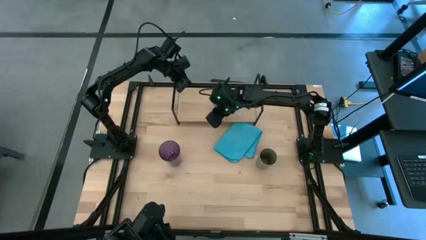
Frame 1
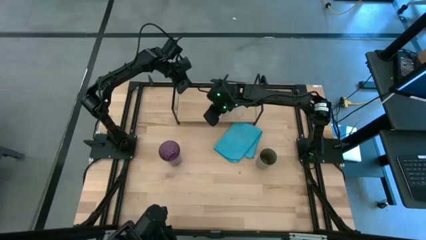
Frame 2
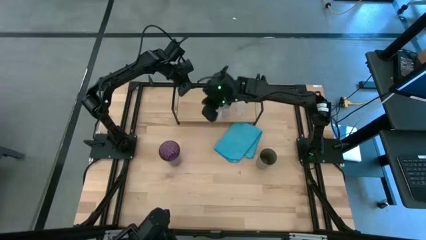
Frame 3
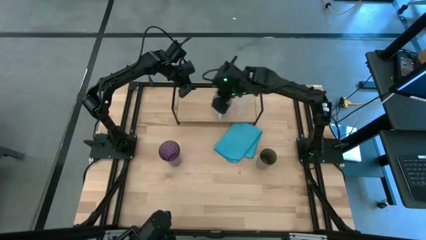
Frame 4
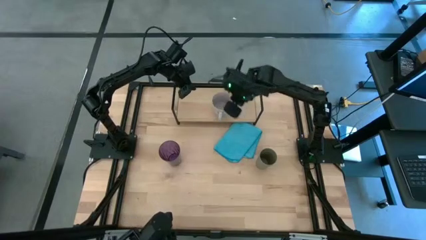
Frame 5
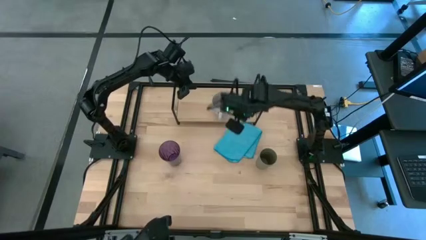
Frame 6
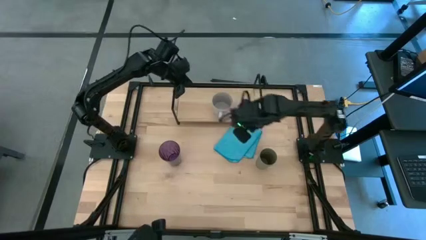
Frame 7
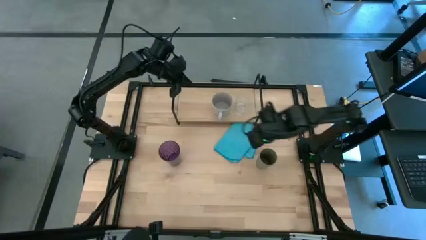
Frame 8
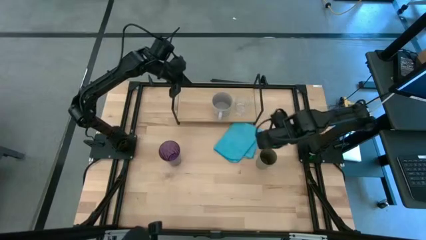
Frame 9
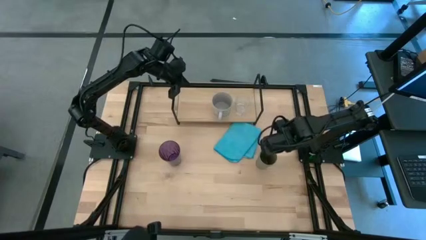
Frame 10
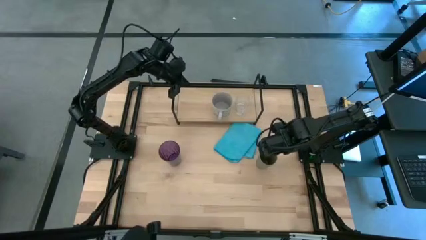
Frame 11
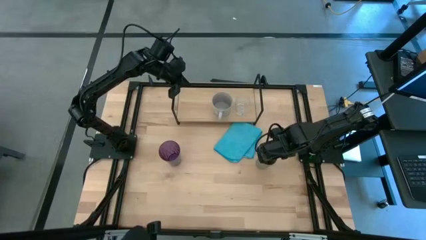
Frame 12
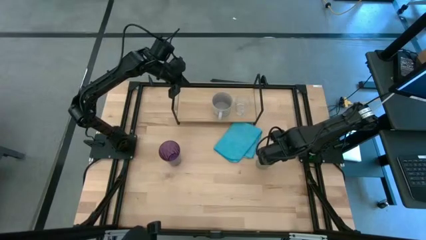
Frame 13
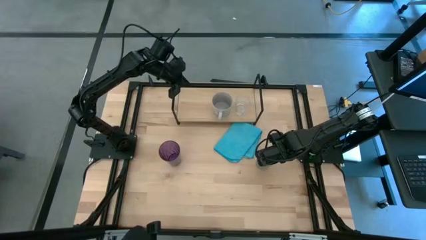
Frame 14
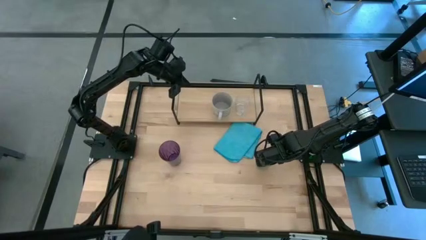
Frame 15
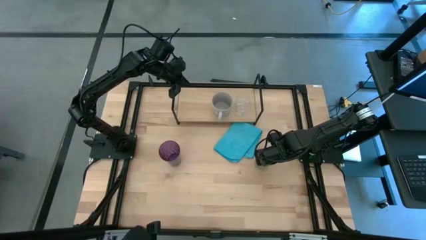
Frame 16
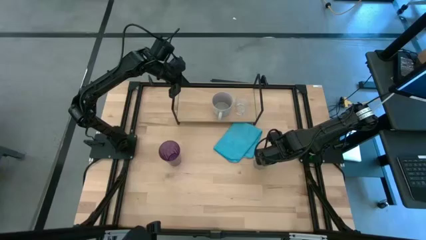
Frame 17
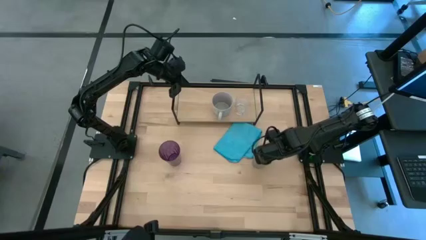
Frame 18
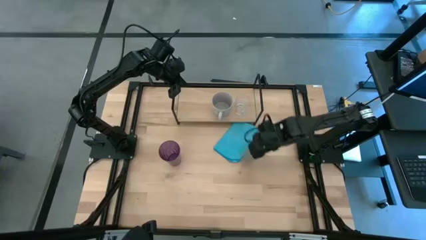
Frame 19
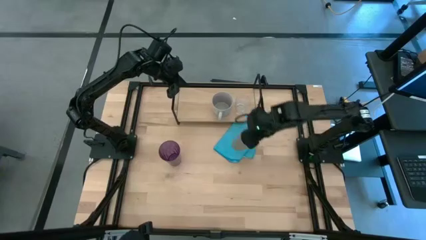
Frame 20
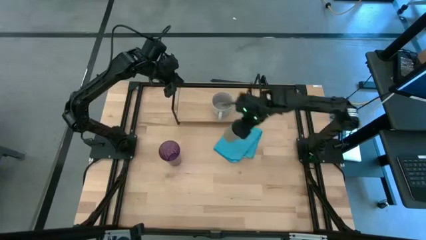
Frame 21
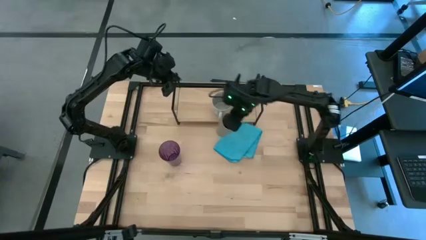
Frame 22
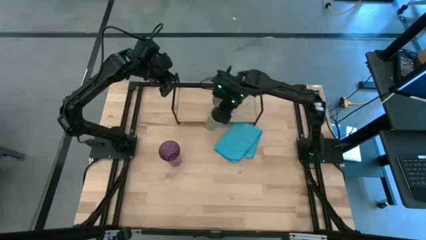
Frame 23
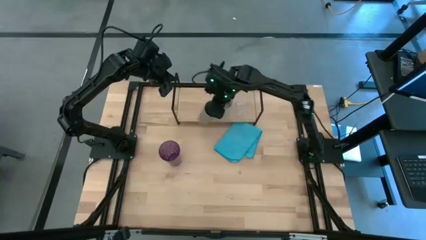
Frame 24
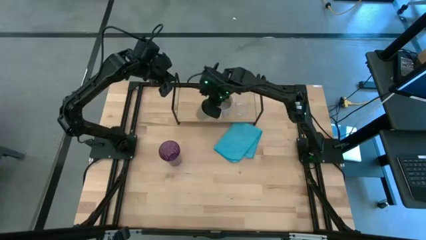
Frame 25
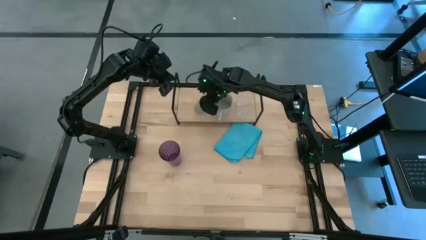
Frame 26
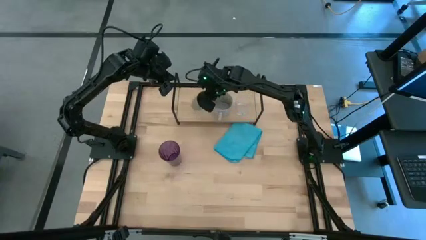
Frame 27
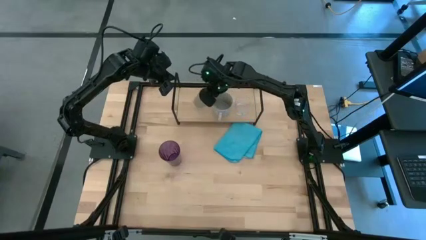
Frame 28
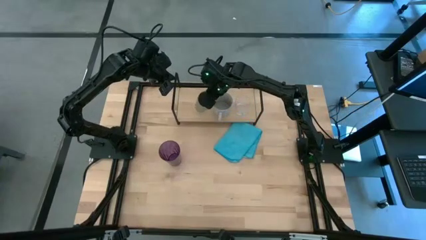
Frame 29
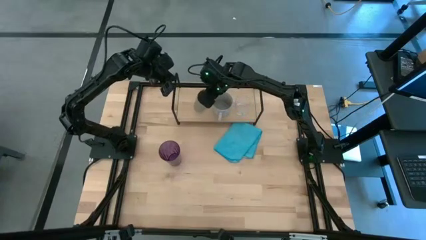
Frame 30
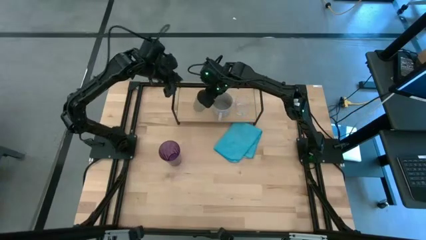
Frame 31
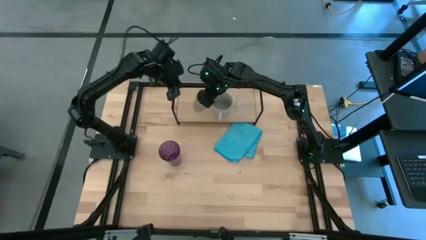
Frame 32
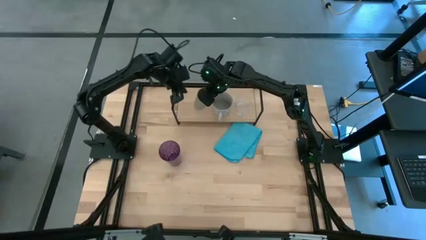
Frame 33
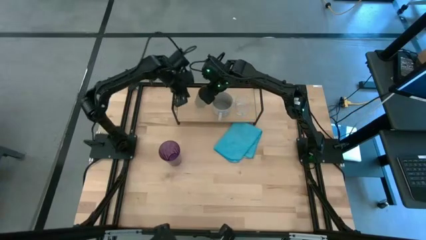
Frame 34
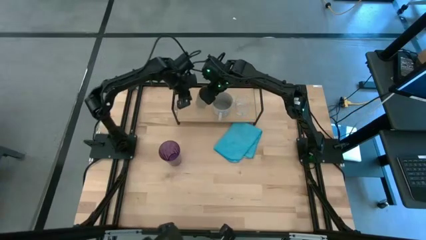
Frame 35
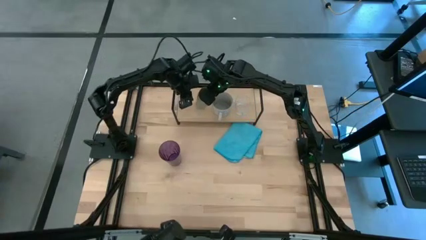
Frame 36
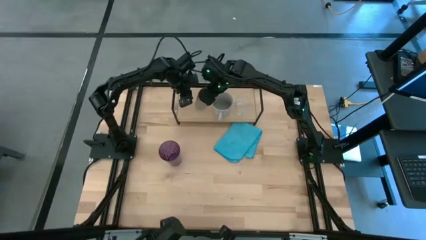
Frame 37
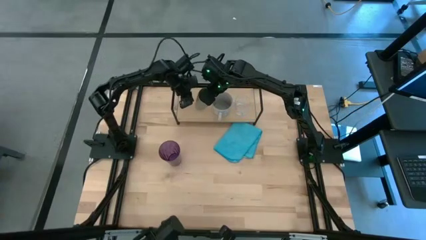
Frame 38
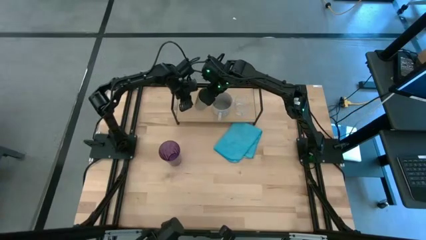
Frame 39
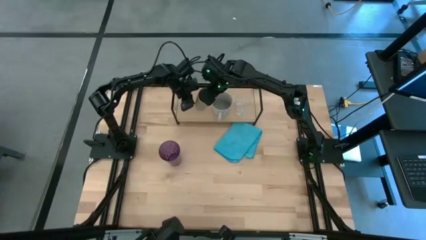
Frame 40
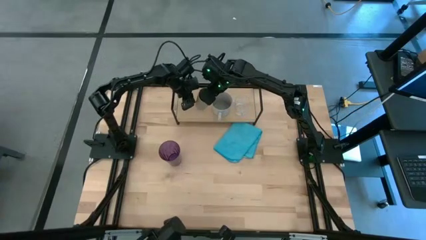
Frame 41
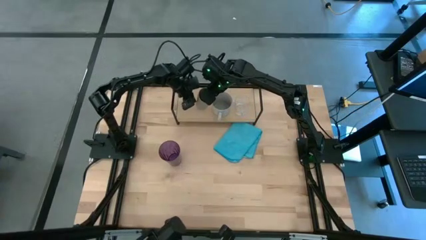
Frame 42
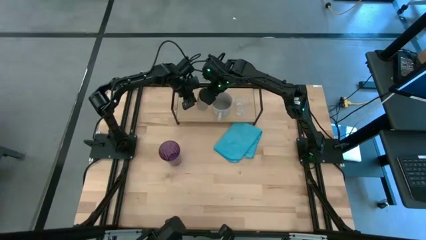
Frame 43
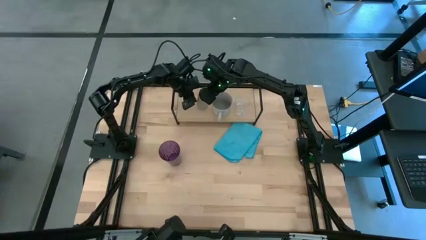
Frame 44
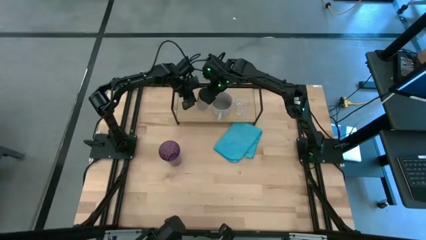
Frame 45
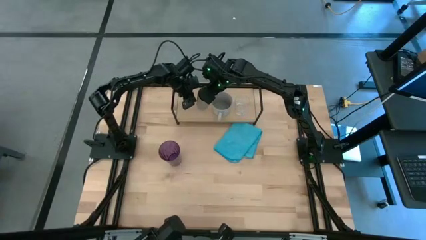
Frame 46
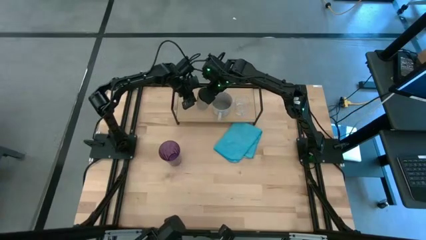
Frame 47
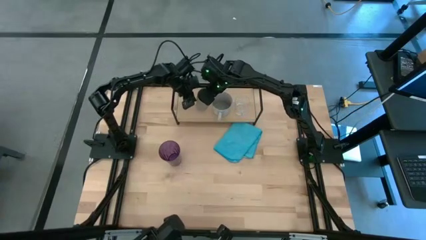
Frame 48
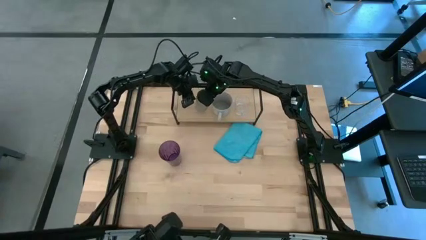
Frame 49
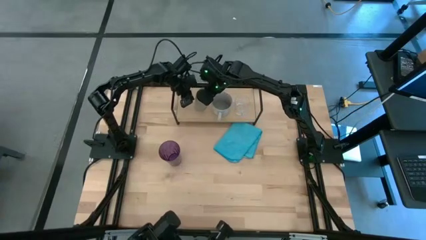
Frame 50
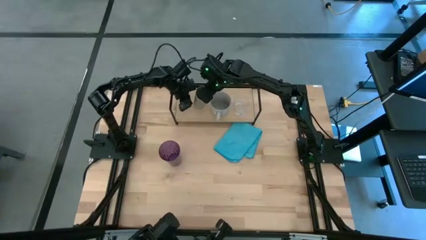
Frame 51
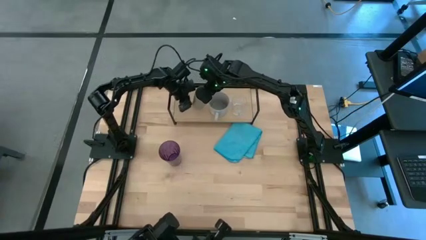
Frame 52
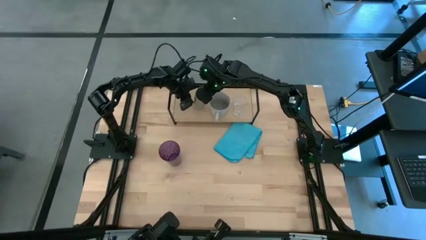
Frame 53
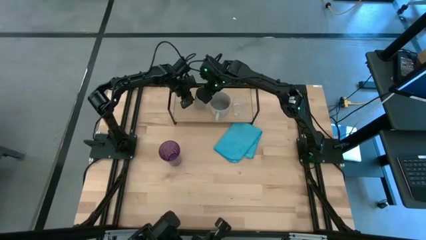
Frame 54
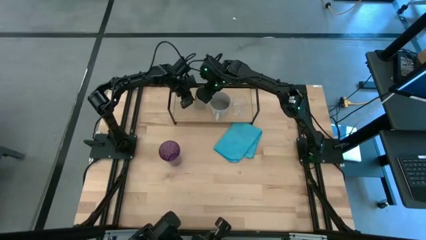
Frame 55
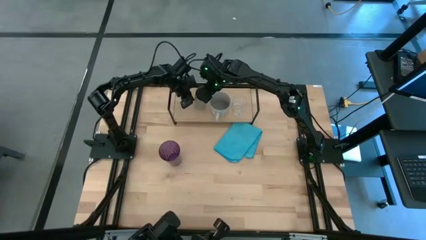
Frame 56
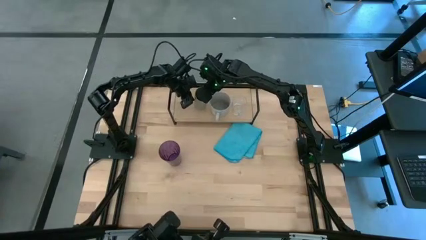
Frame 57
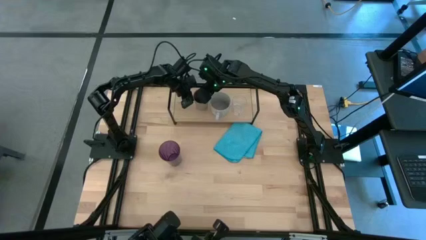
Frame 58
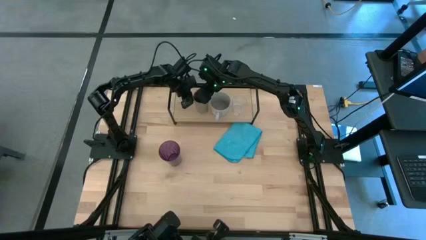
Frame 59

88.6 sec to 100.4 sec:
Task: Stack small to large cups/mugs on shelf
Put the gray cup on the shelf
